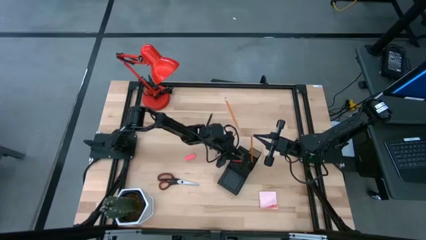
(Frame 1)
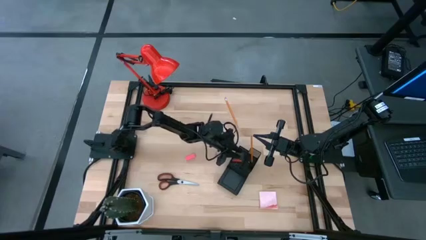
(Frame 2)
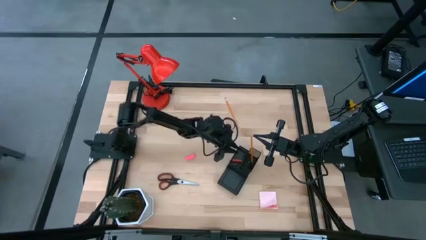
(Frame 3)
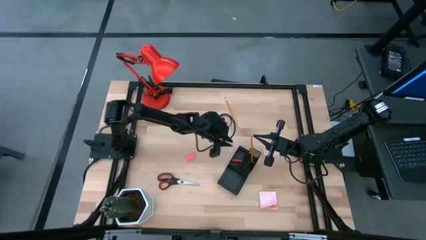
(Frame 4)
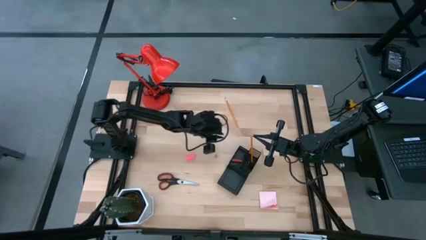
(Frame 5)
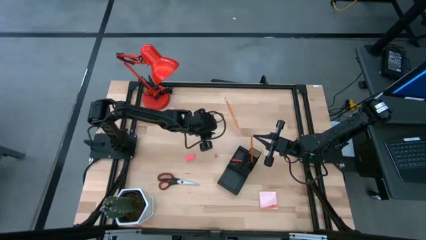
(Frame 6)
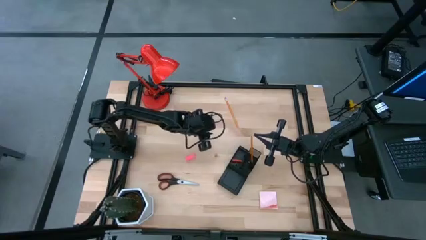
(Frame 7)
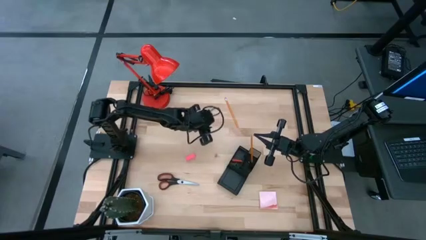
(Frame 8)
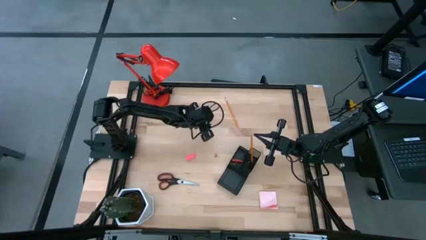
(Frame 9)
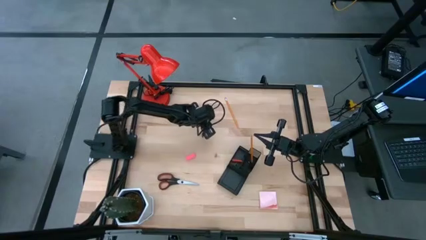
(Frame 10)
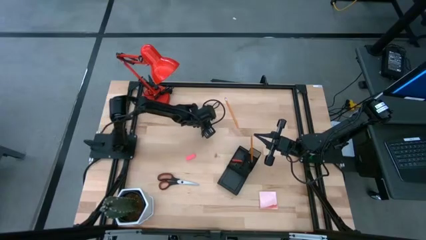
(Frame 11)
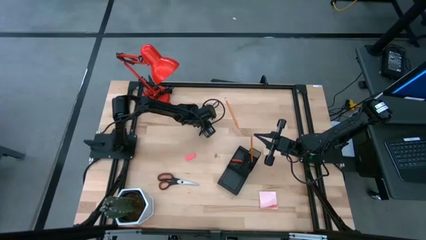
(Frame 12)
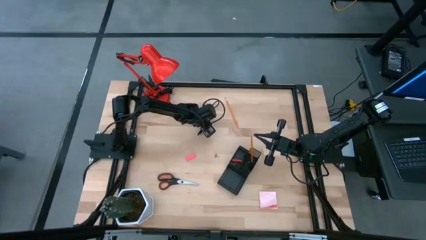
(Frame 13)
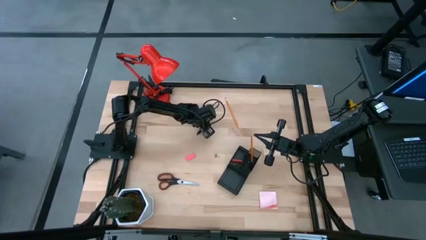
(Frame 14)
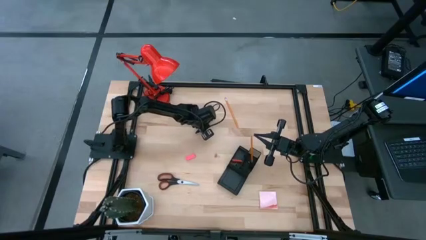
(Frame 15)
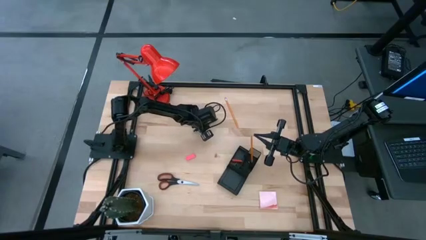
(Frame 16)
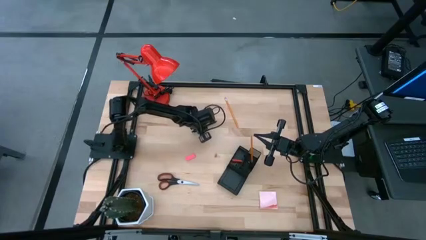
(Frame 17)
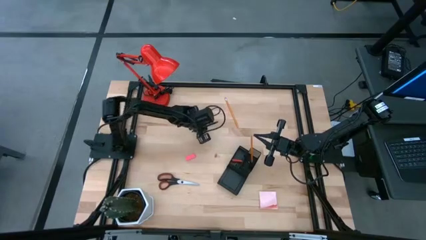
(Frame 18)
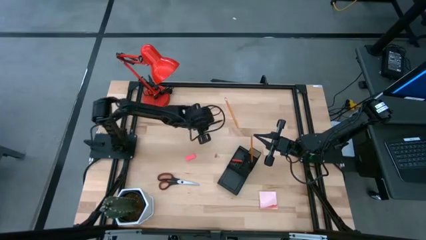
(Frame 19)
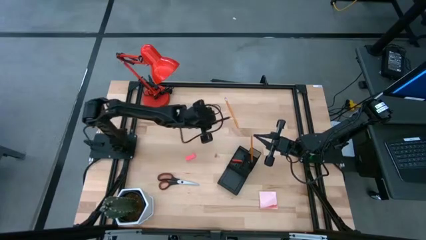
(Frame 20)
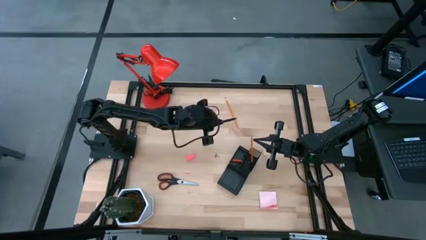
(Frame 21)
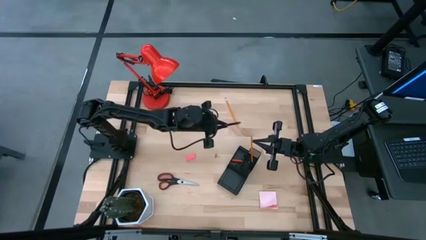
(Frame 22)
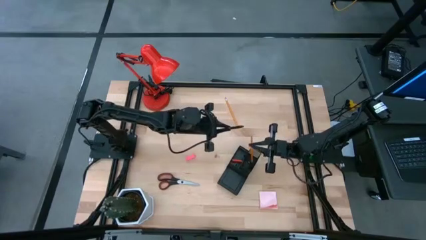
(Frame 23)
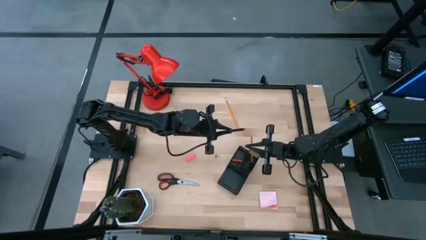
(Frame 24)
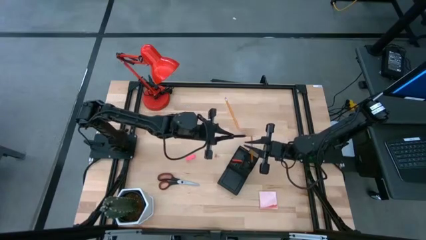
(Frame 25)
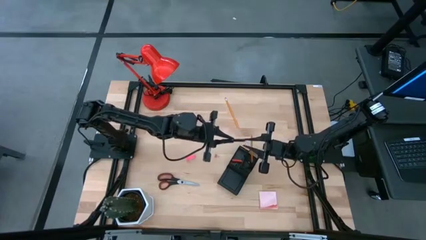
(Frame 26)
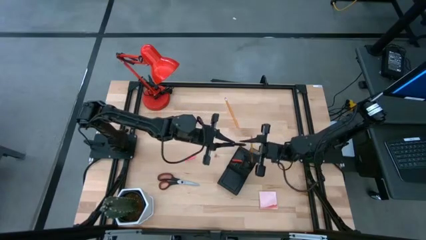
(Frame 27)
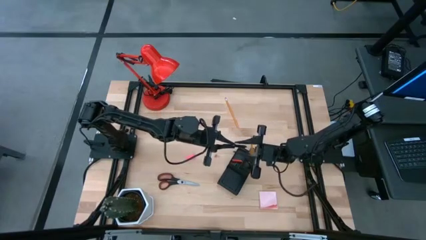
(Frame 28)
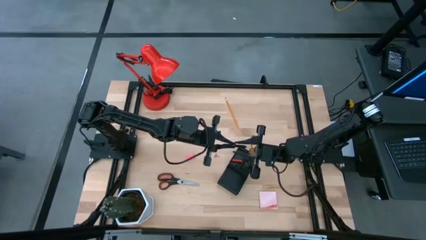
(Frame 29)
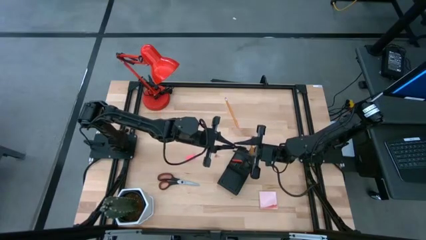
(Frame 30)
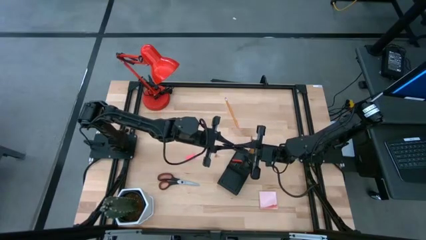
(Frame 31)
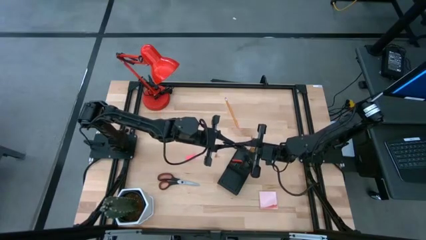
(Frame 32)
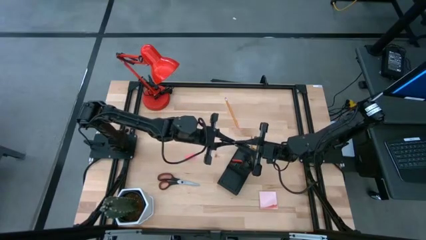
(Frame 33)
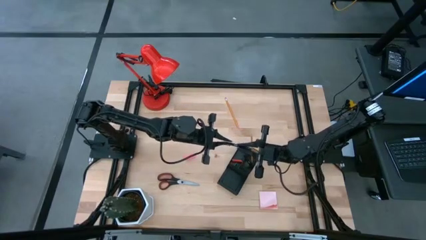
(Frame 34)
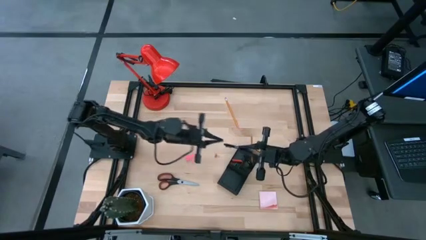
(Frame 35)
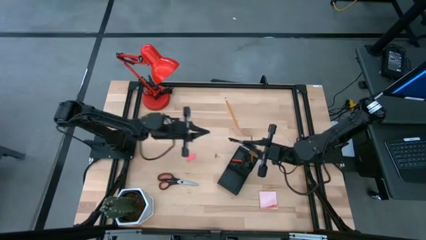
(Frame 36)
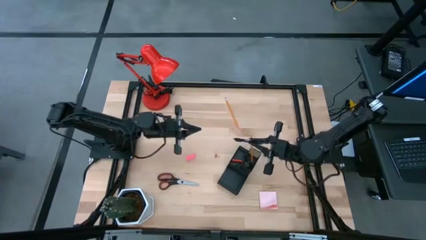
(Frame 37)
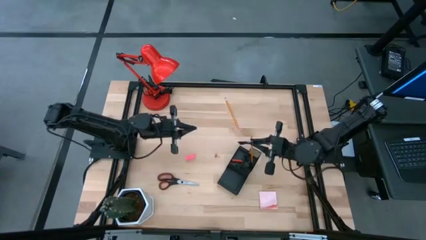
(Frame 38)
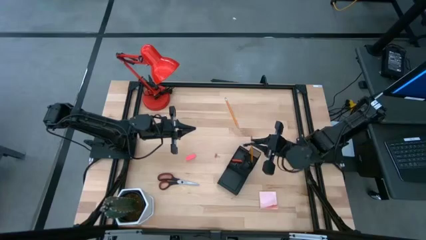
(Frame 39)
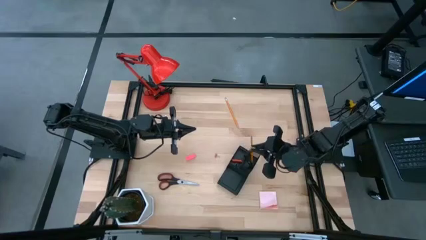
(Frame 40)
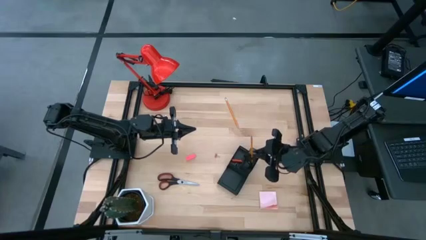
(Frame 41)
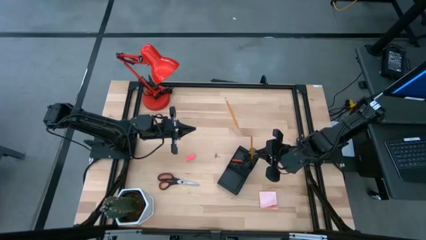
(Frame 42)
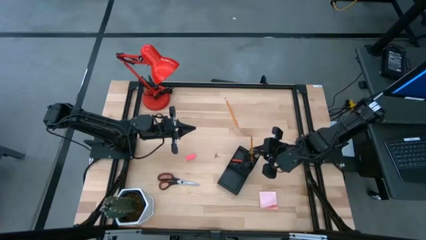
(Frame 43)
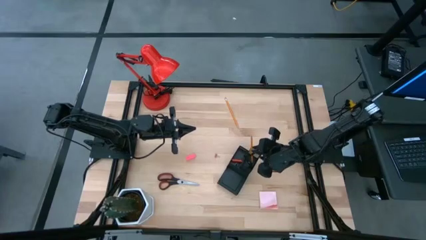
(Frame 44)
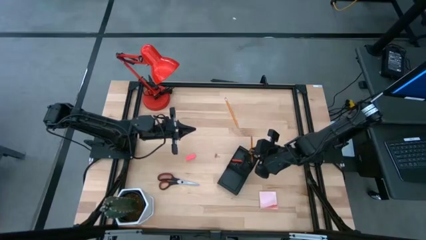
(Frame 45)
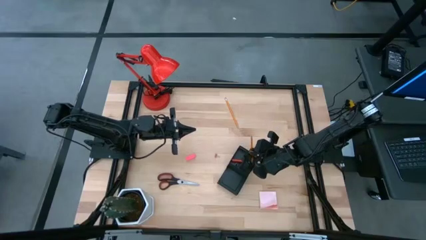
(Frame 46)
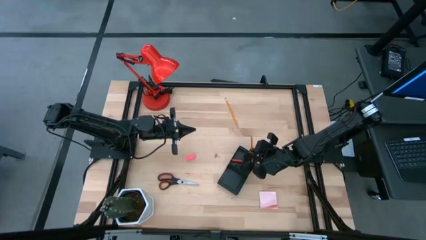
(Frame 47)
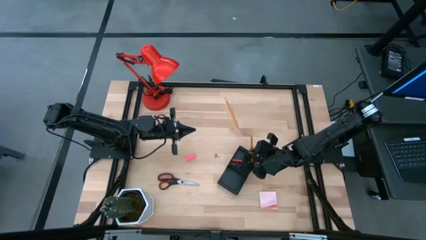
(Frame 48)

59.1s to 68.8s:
Task: Pick and place office supplies into organizer
Put the pen into the desk organizer
